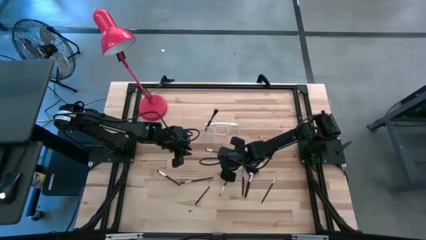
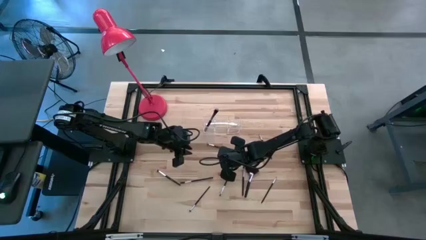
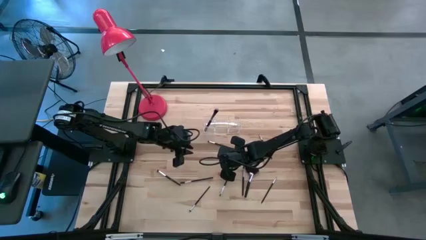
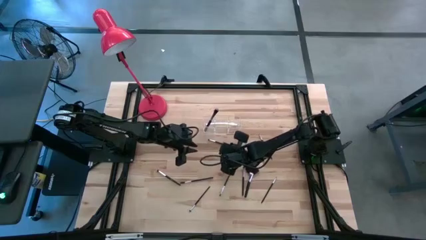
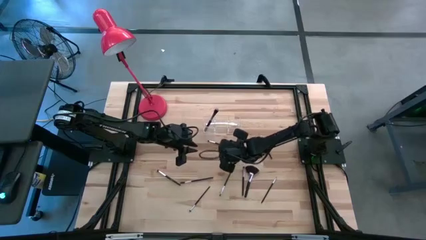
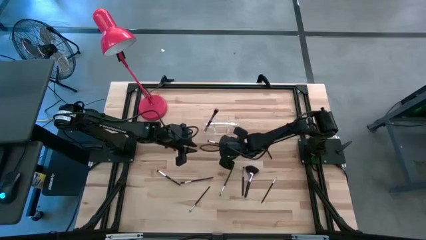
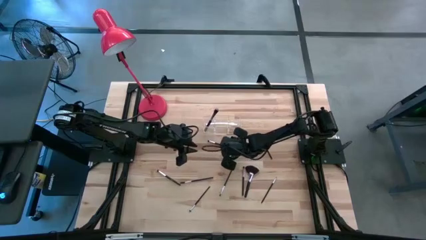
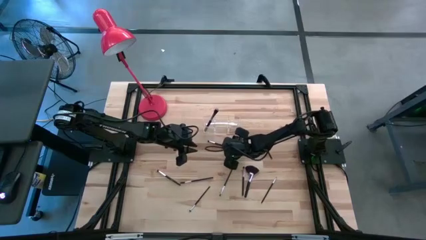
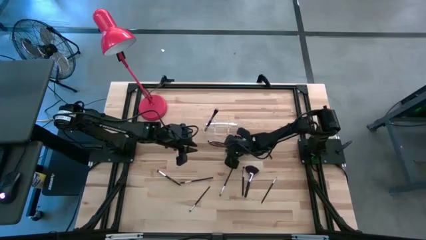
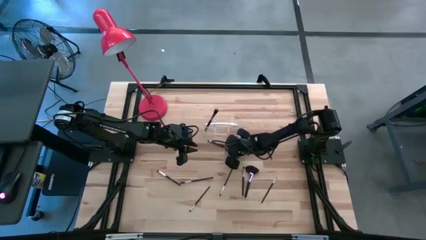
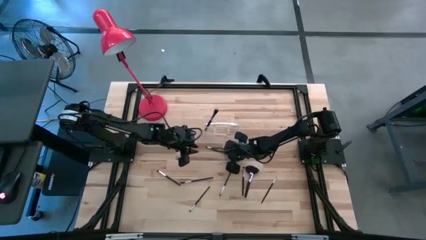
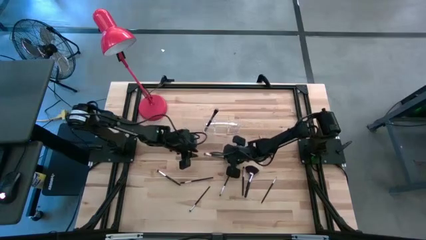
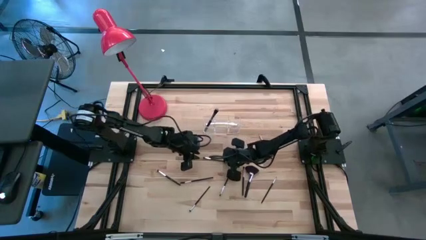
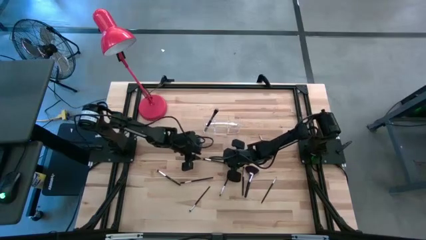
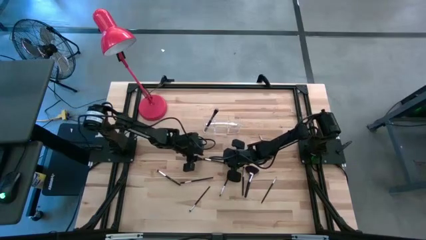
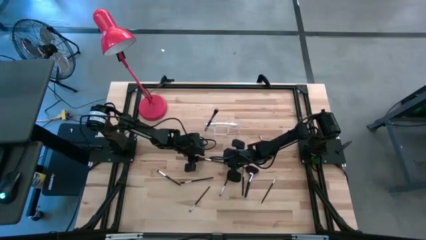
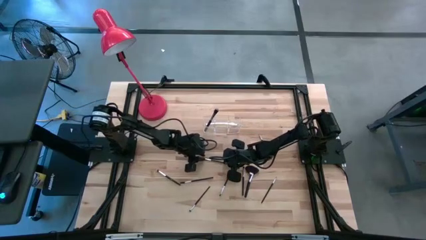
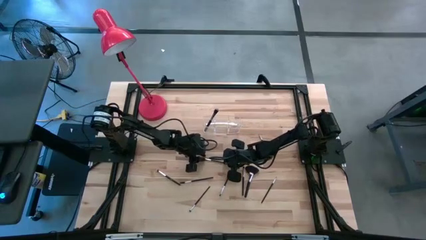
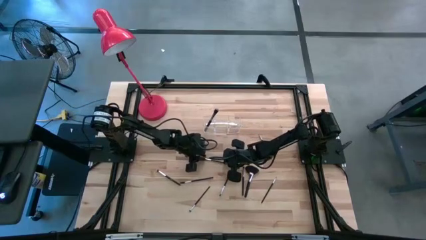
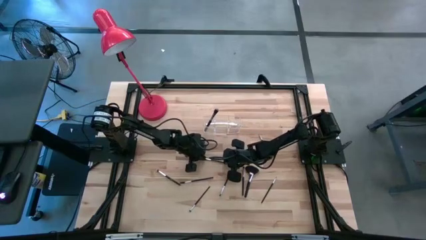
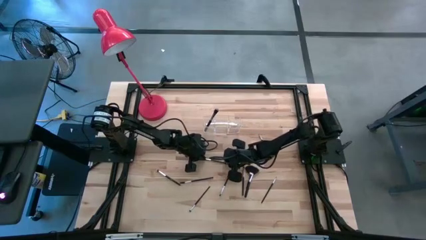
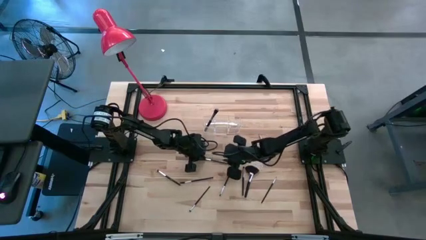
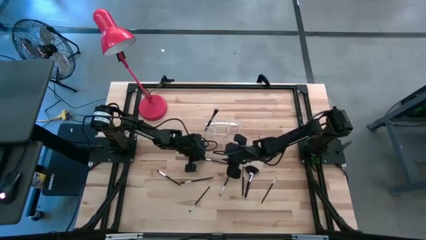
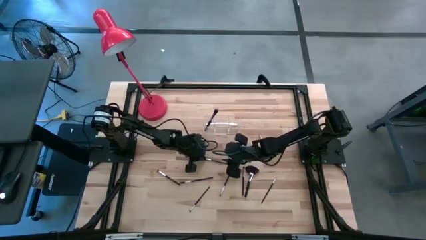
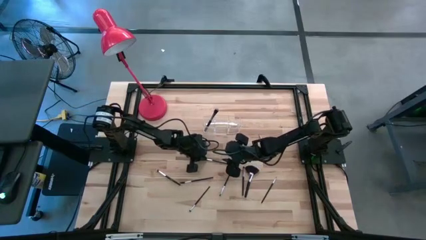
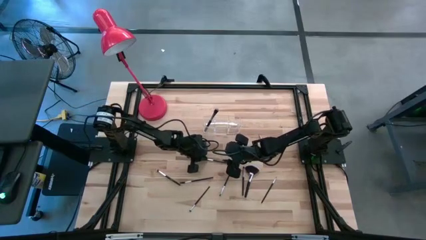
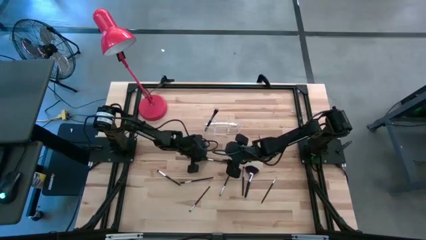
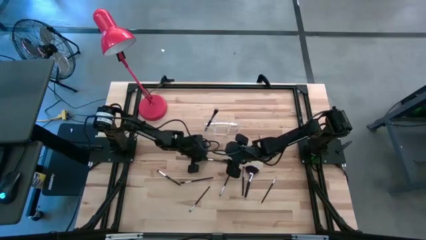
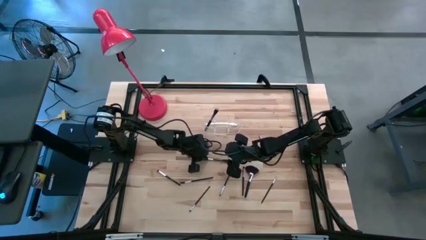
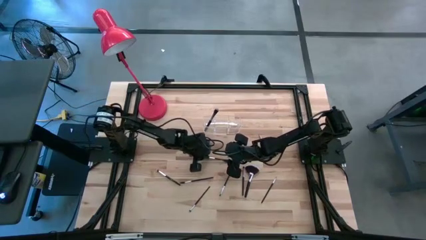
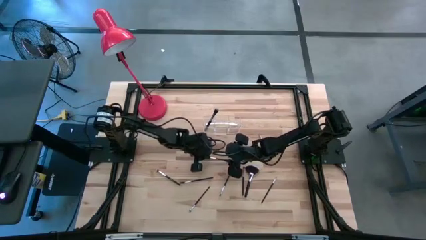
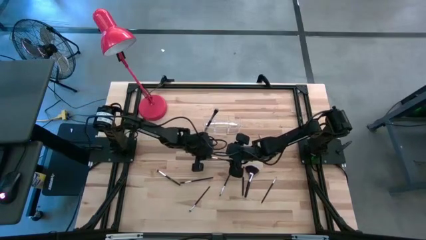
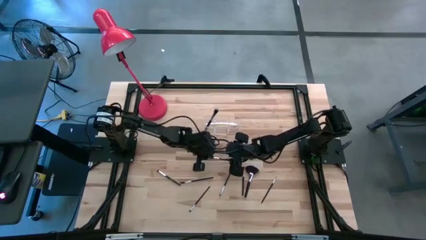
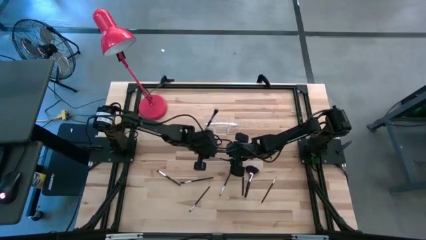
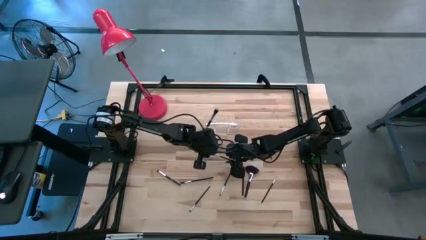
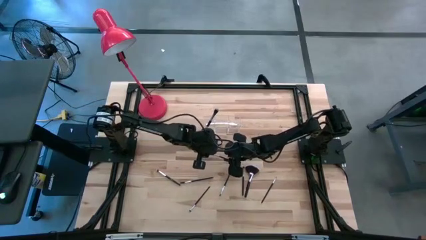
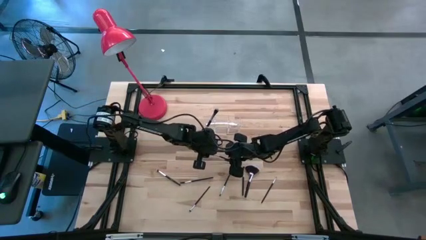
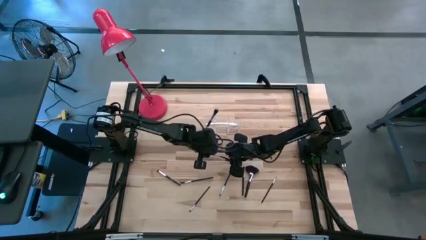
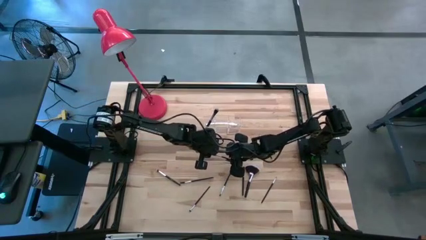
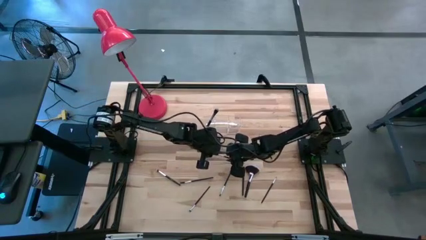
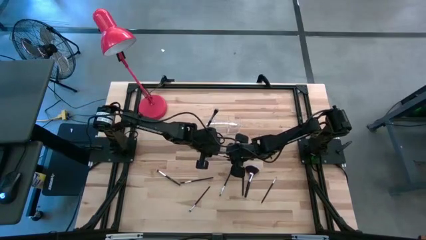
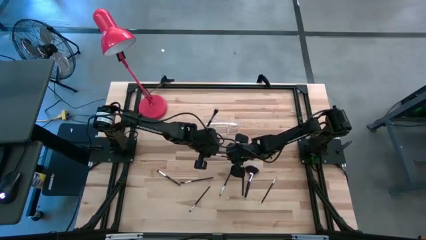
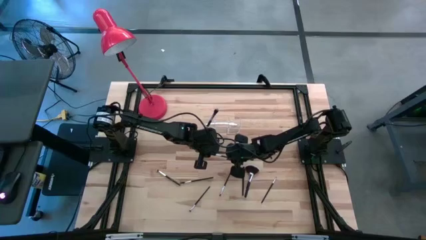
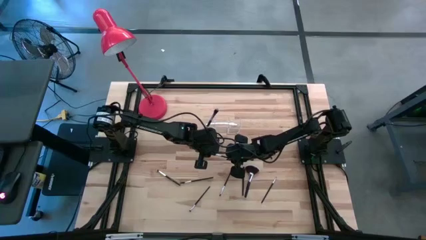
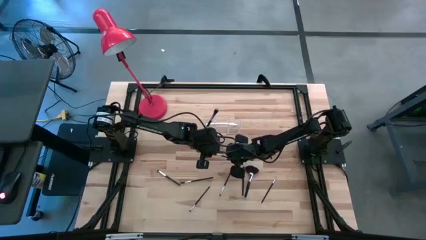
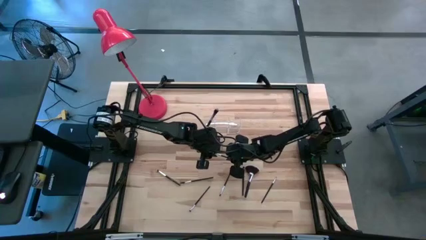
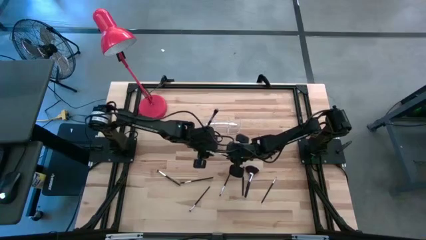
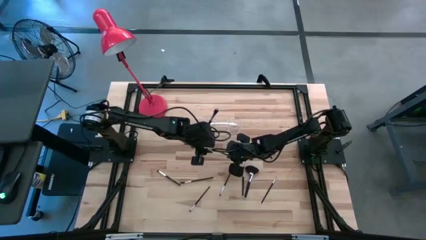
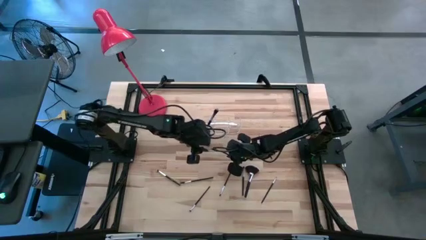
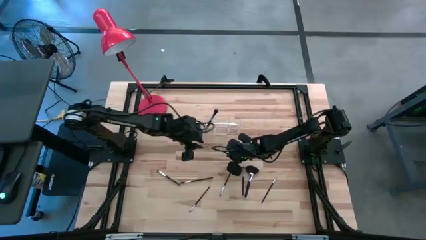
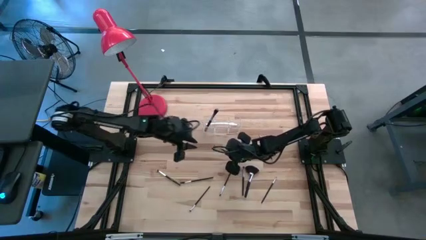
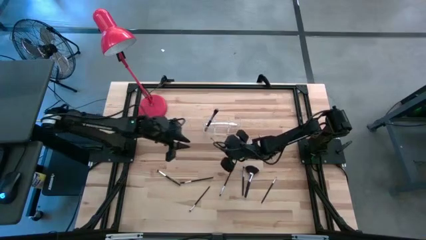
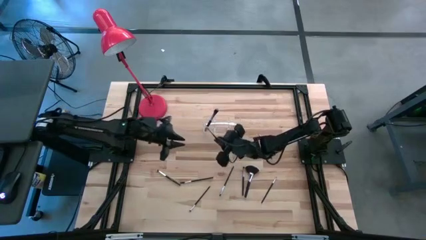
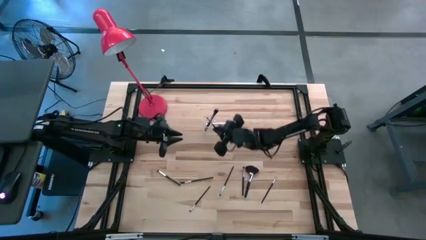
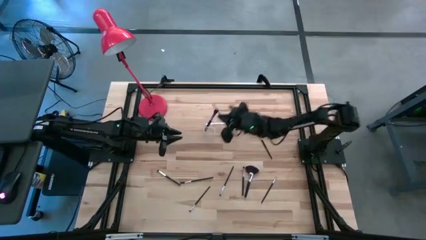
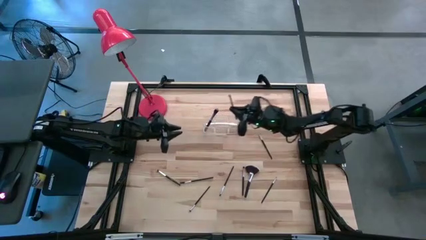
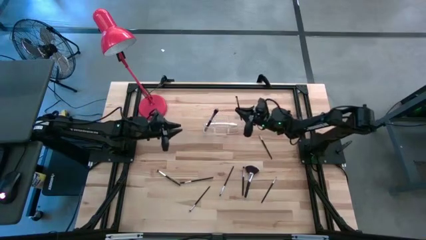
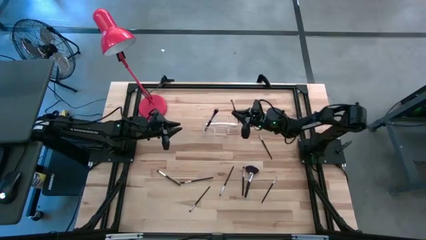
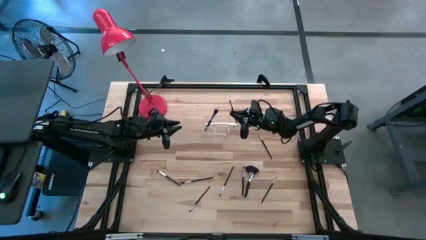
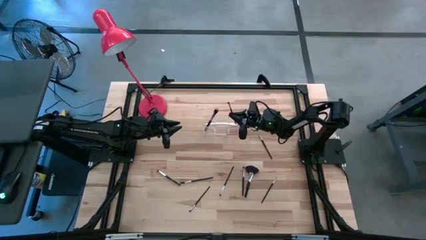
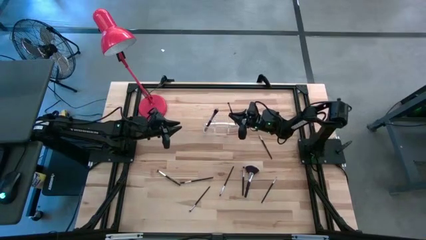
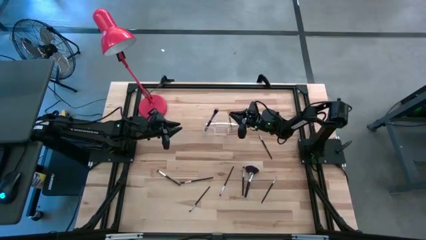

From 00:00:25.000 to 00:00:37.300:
Task: Pick & Place Makeup Supplies
Put the makeup brush into the transparent organizer

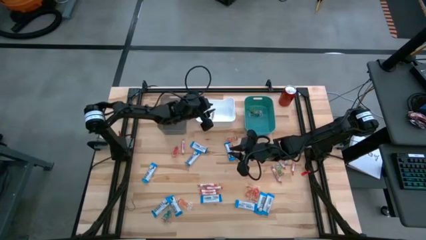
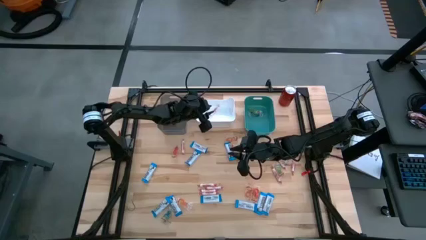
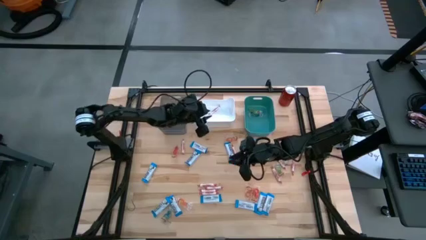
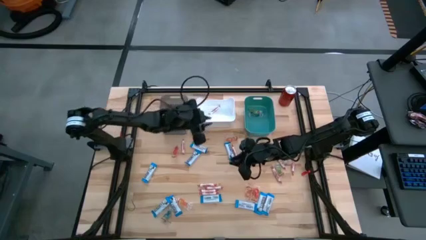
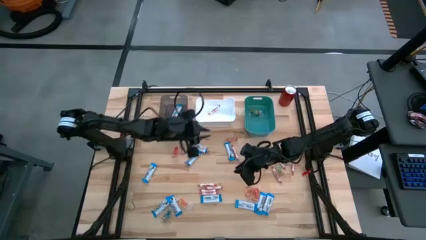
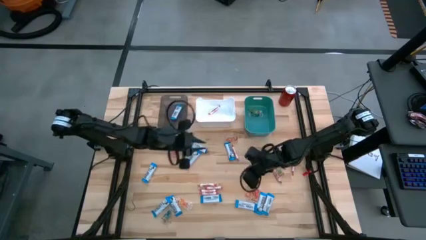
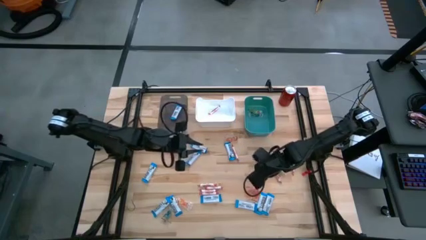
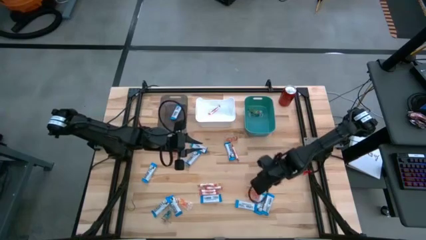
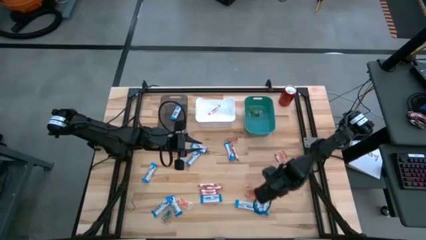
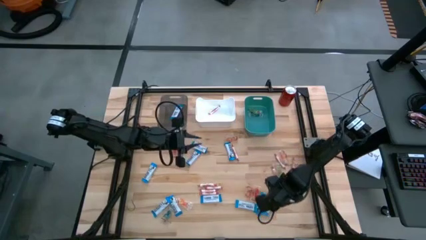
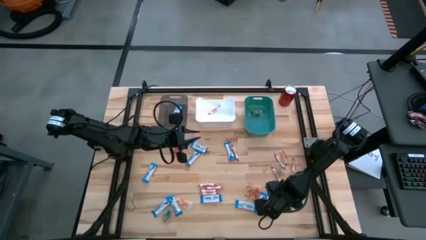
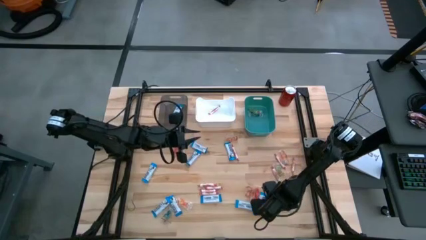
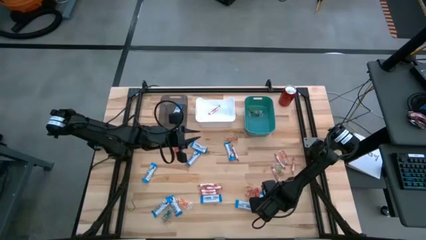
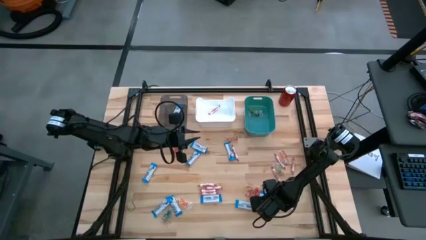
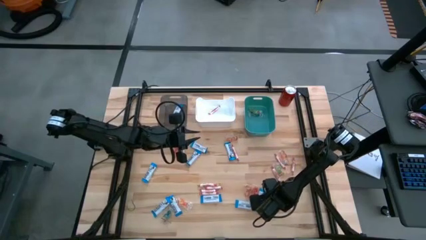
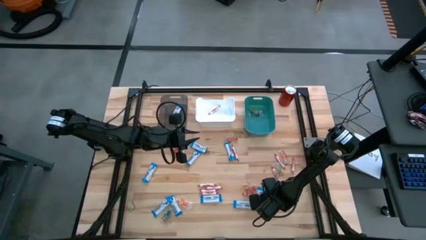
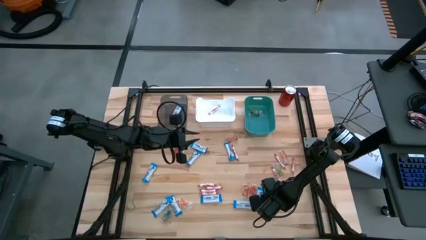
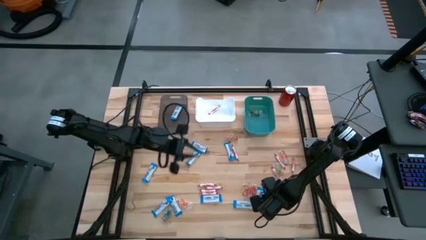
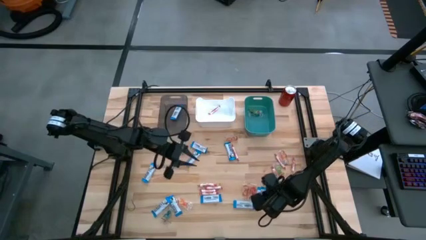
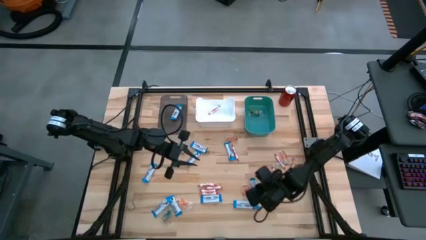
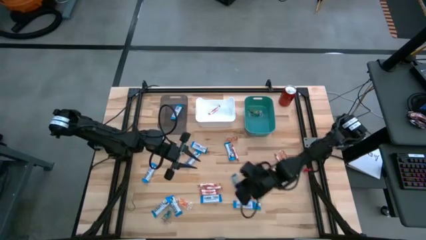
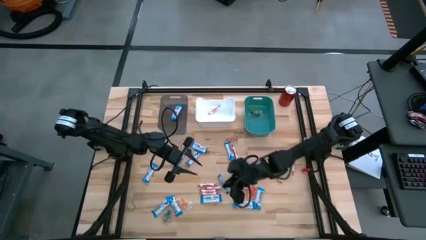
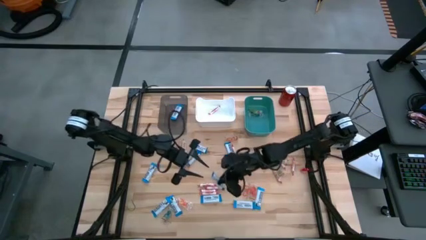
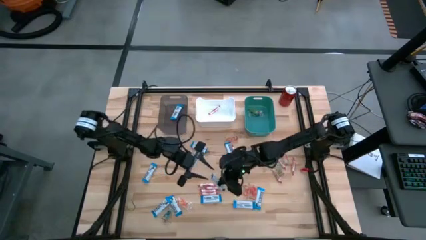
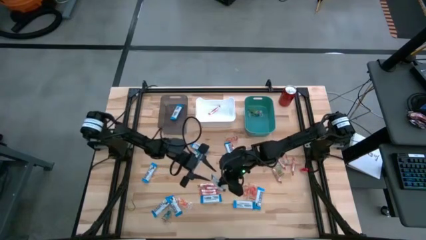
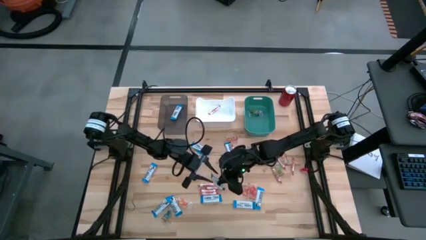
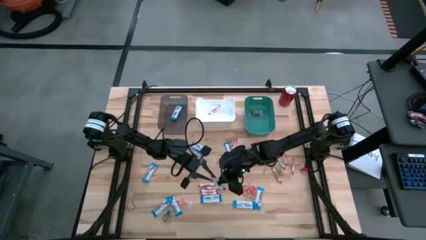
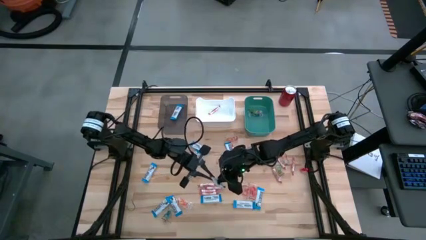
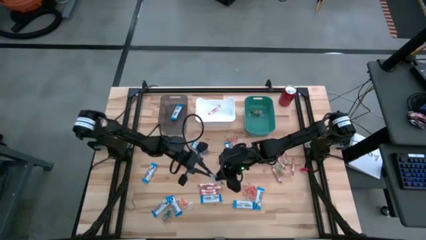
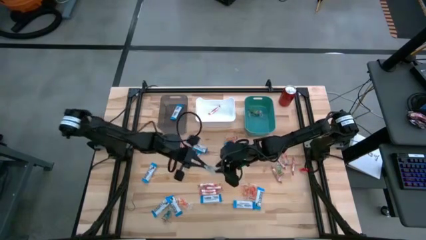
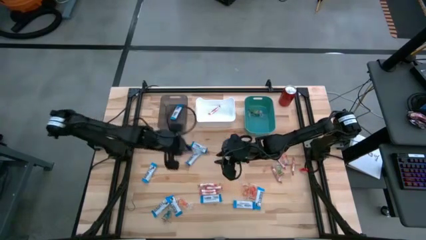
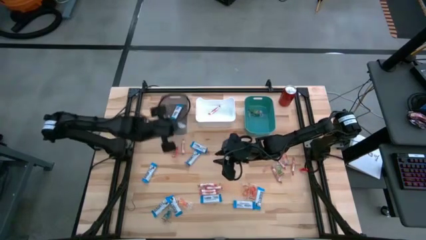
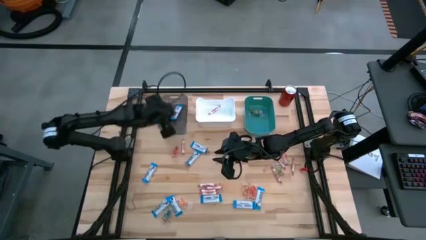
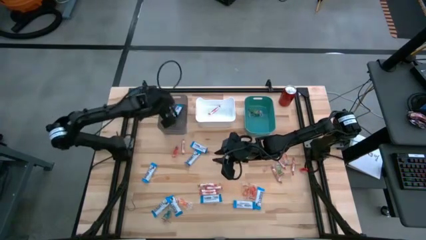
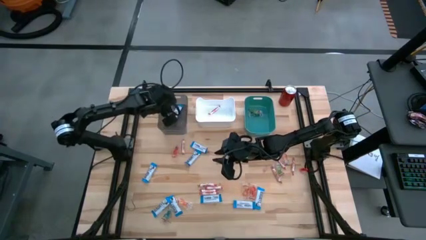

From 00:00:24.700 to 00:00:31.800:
Task: Sort candy
Put the white chocolate into the gray bin
